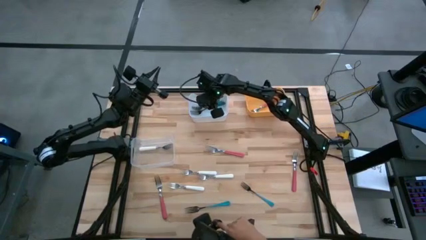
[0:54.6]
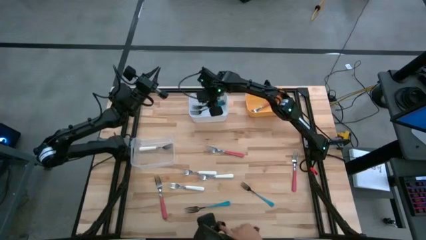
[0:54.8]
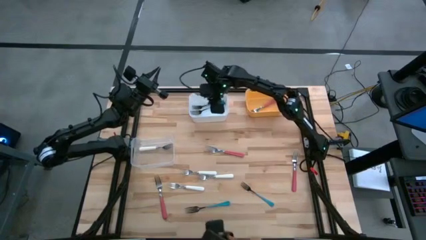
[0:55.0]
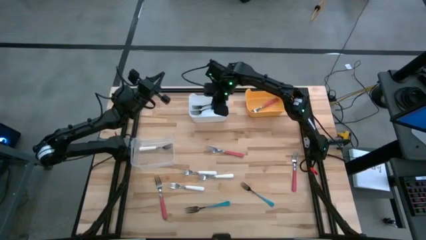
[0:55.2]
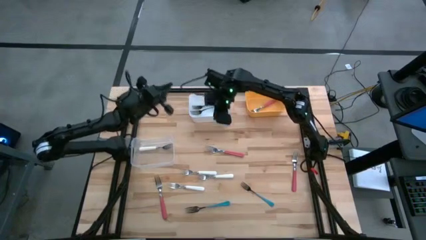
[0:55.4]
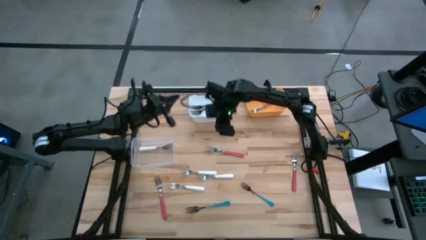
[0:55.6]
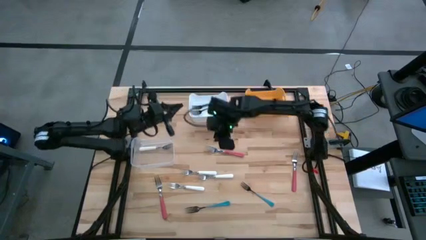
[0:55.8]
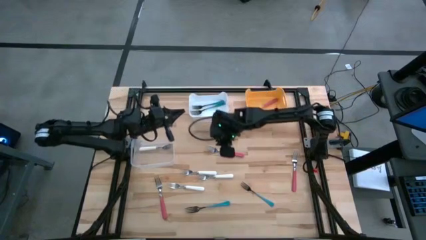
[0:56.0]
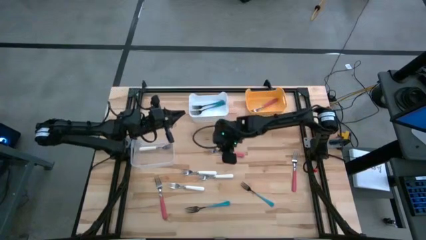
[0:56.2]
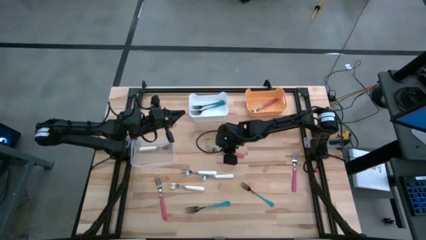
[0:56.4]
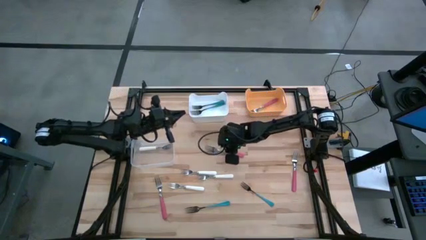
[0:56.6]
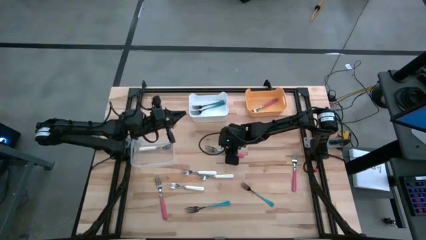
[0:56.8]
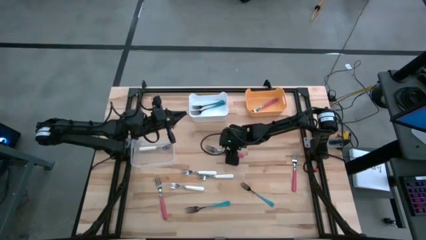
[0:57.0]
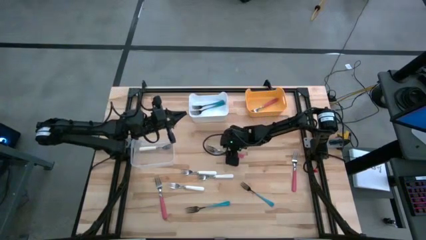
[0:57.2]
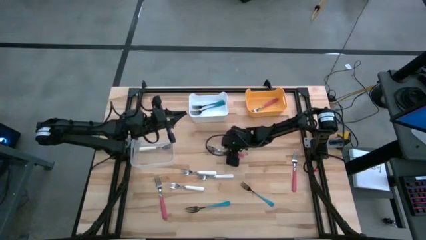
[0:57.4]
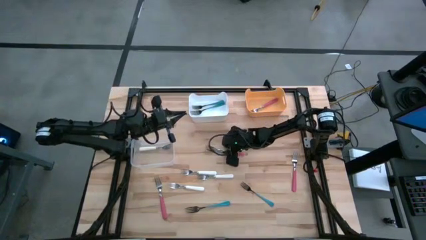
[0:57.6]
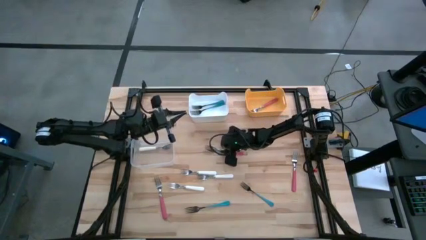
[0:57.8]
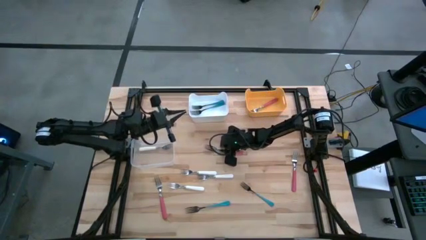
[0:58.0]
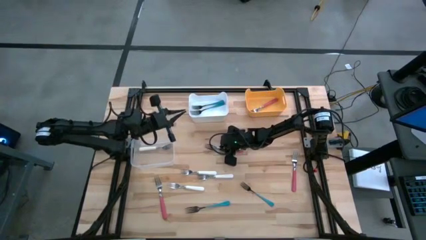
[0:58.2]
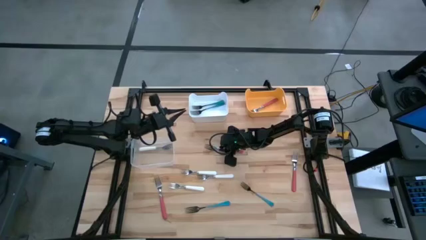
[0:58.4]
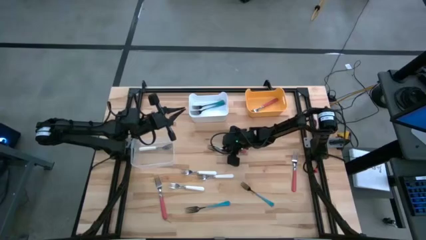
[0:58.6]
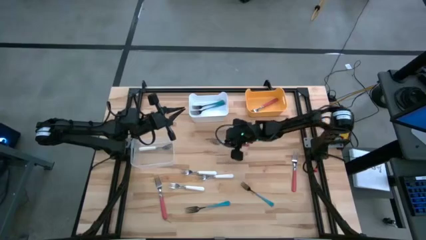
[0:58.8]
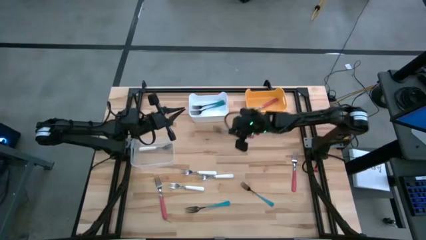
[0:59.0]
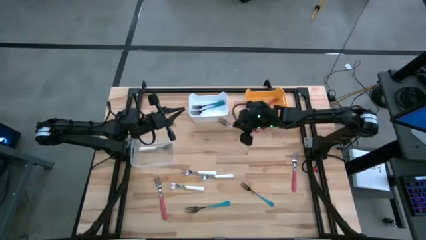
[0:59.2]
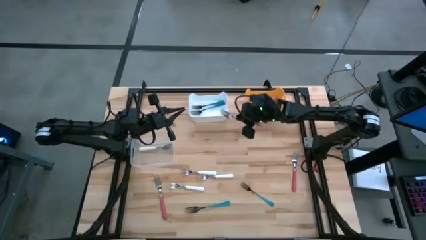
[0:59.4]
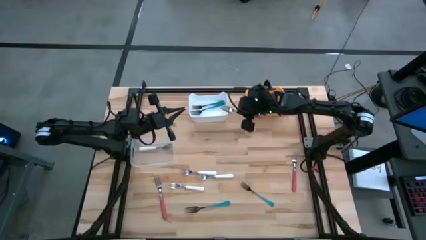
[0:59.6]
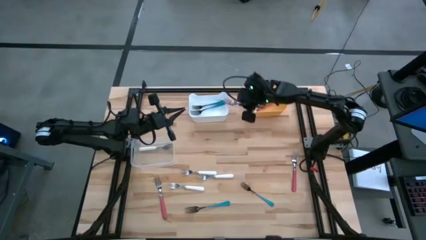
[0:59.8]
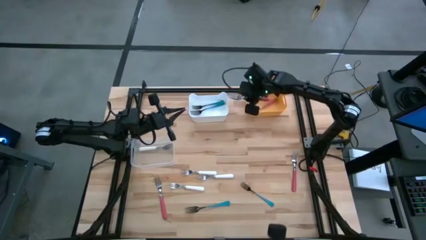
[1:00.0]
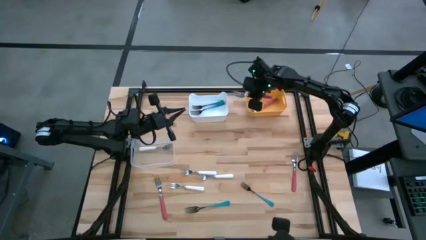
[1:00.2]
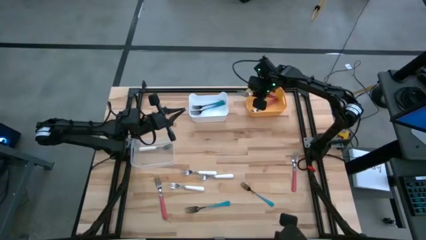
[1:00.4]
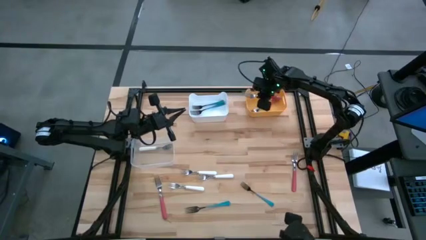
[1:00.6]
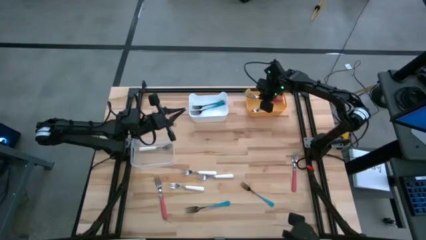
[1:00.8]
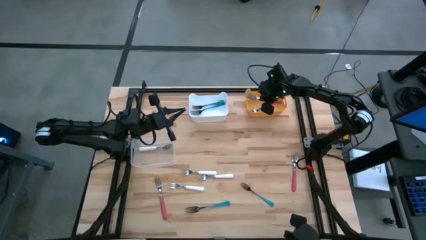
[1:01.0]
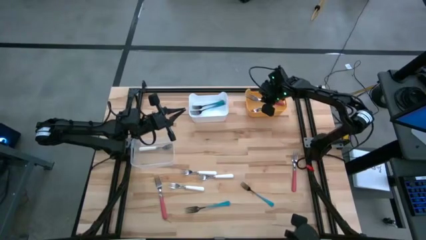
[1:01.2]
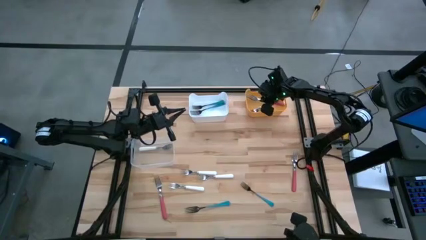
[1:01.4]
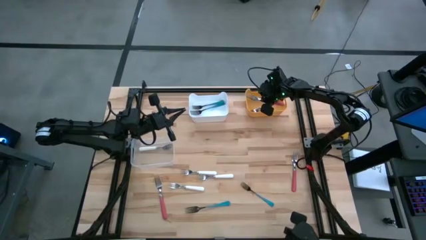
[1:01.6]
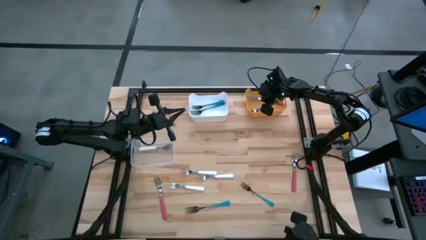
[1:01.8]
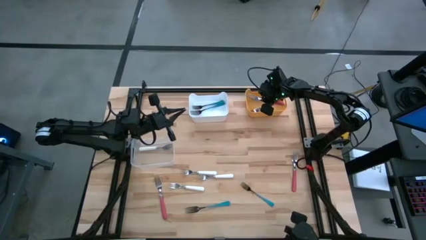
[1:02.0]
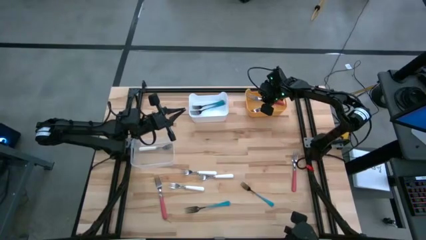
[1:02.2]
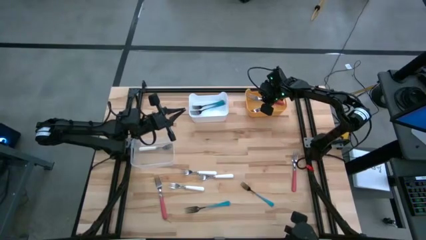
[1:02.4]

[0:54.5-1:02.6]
Task: Sort silverware by color (type)
Put the top pink fork into the yellow bin

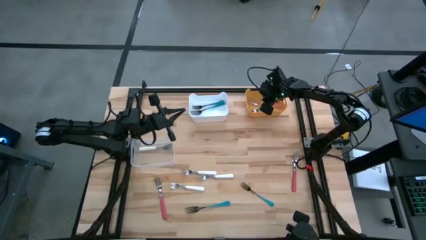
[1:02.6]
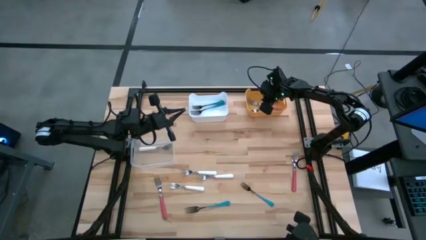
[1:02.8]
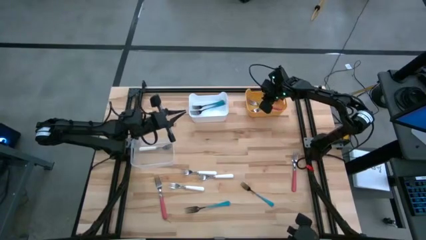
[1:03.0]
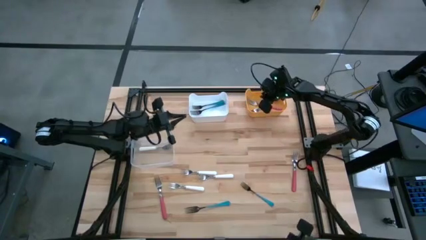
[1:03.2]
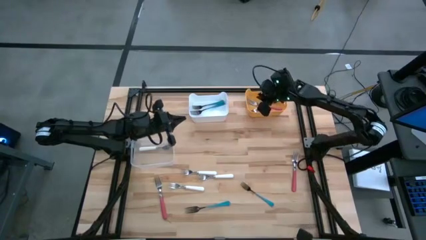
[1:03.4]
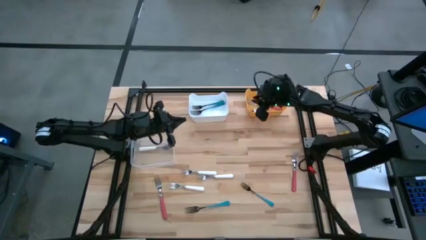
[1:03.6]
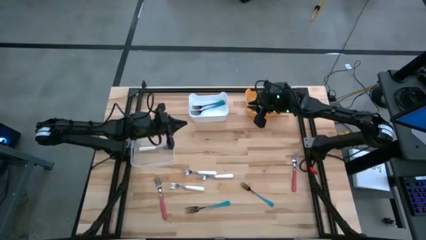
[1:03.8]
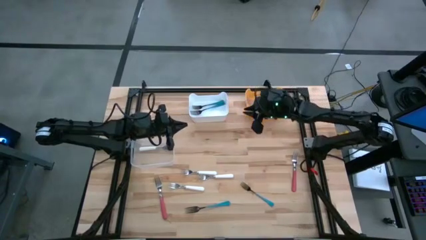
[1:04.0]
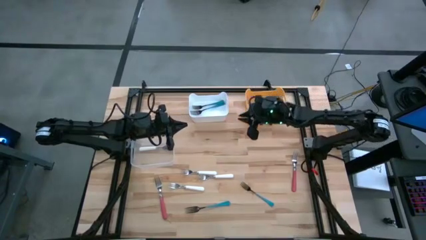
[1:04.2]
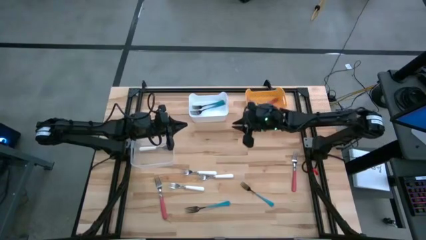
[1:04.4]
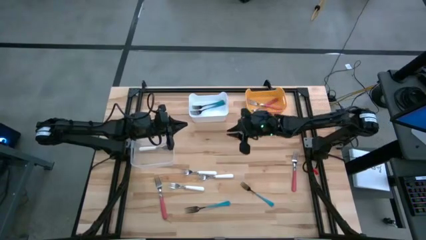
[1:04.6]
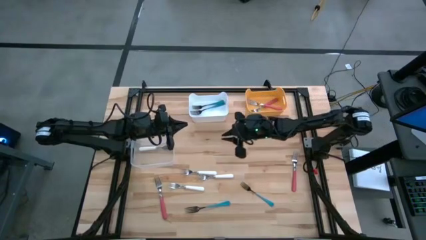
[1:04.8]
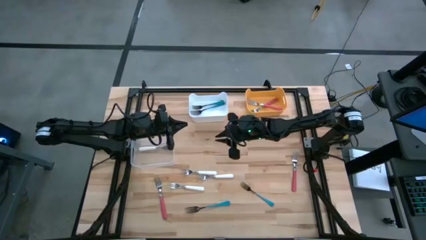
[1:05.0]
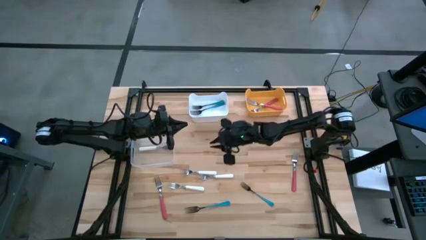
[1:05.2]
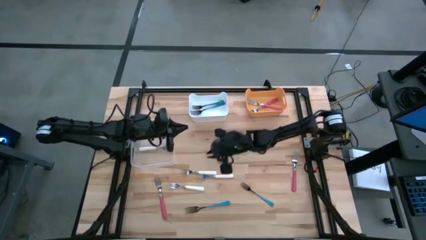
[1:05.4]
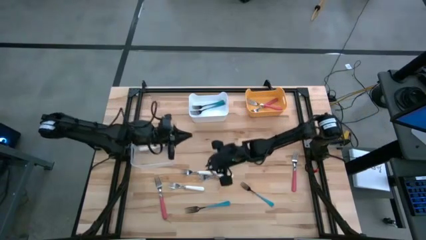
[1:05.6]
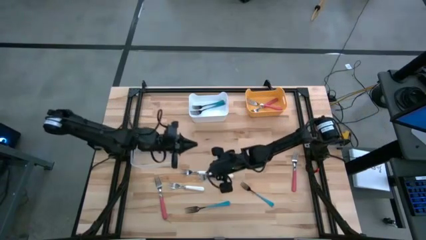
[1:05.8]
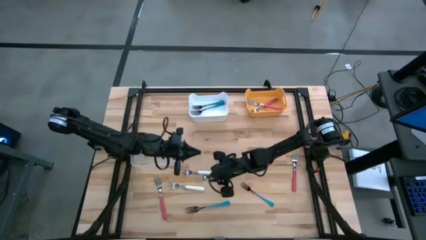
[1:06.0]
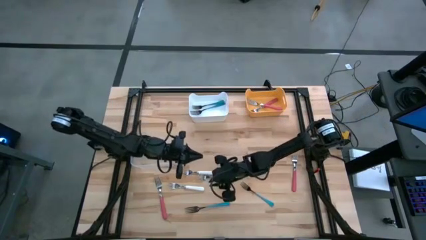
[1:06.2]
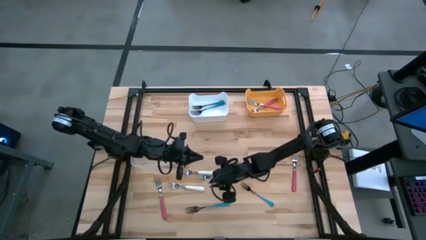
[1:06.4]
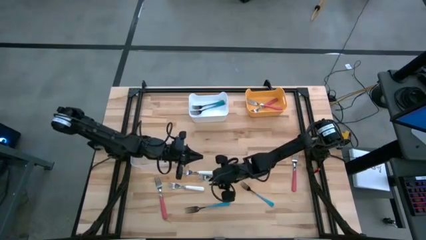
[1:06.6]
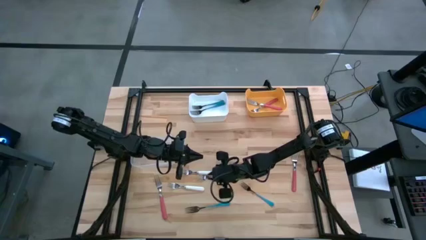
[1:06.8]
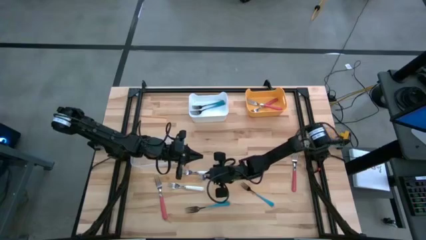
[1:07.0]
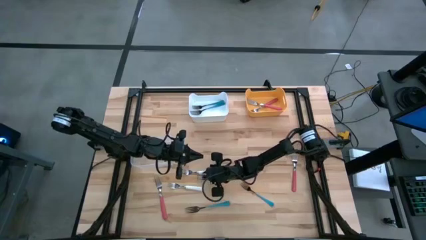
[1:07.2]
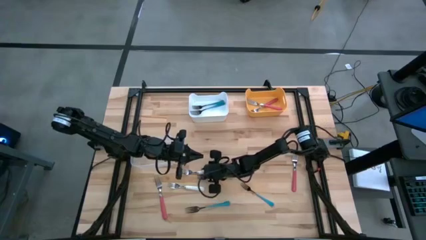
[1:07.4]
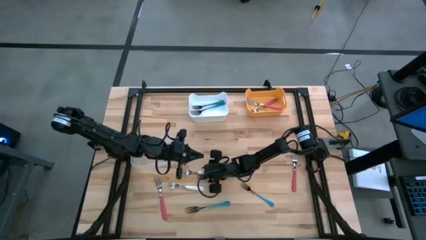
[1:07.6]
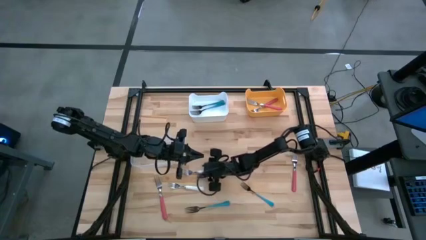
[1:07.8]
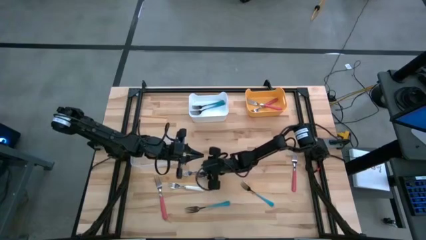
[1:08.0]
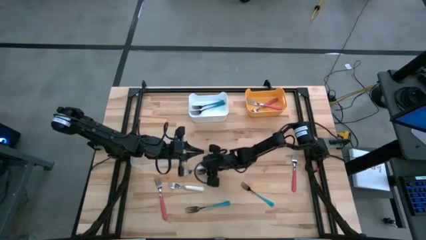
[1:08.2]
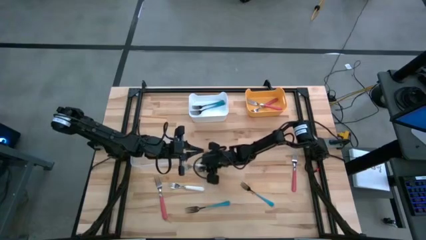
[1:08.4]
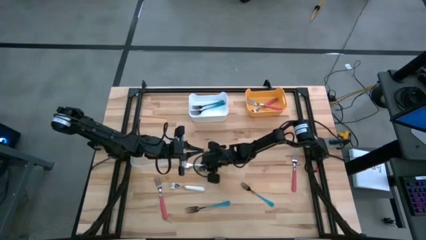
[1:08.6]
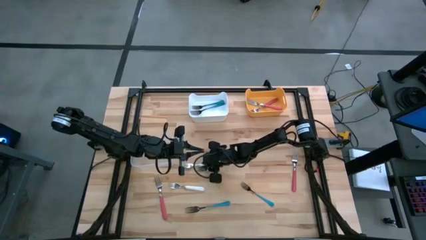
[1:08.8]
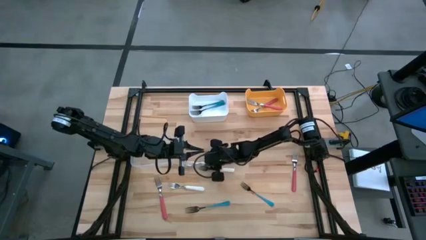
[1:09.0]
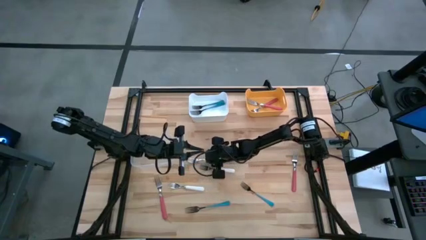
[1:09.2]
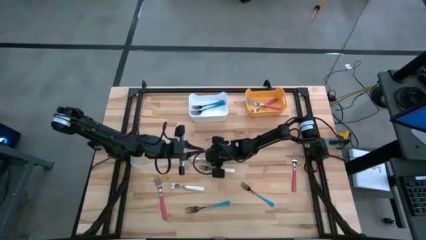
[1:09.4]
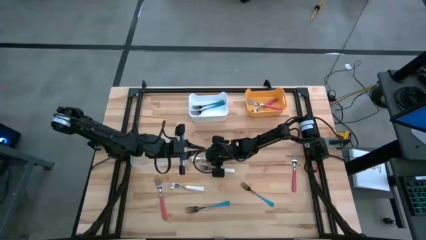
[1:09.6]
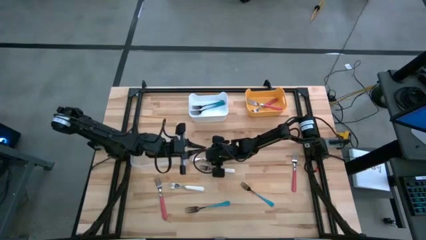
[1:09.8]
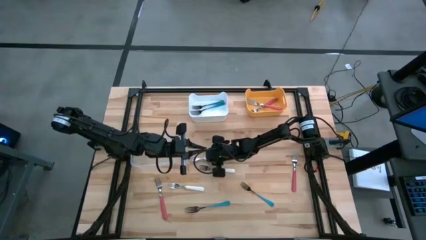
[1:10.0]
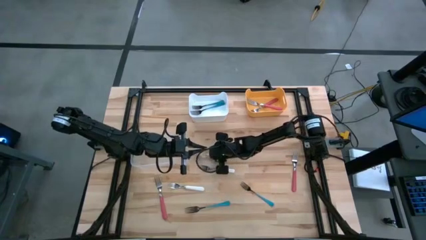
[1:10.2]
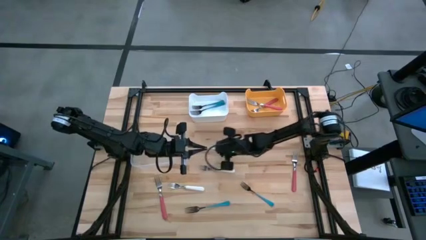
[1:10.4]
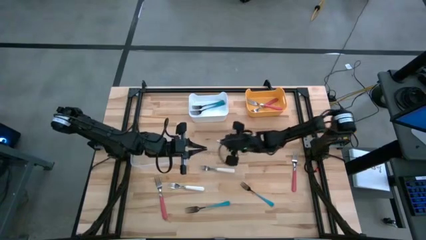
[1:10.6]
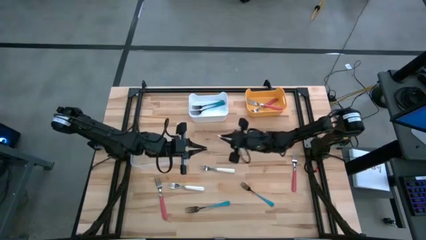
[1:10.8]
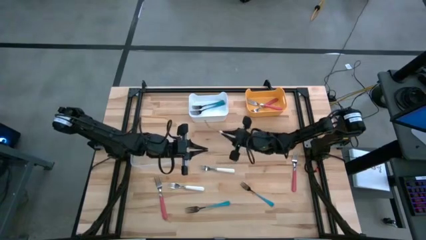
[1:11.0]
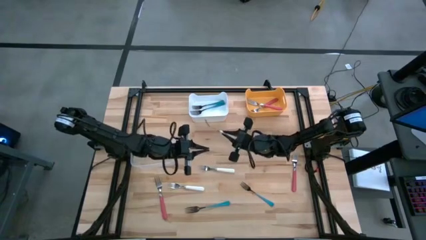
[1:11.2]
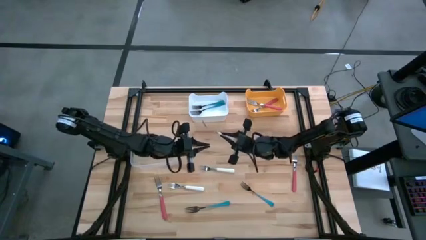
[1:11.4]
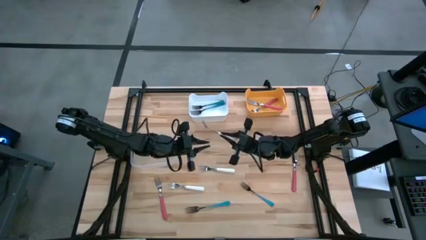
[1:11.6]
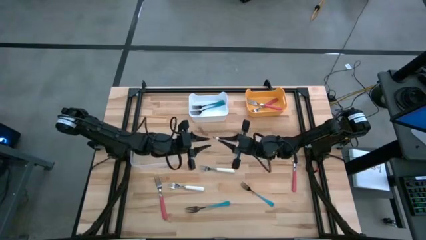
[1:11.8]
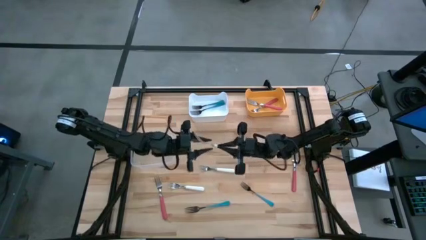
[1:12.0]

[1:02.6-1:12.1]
Put the top white fork into the transparent bin
